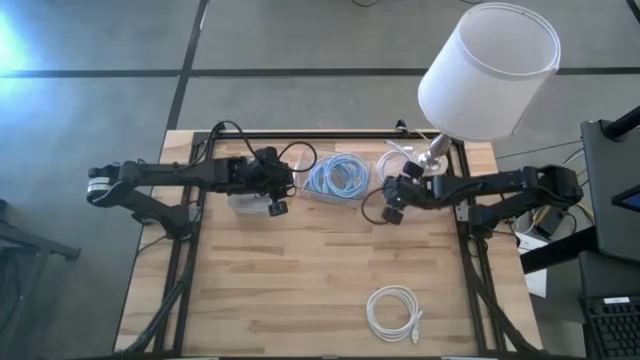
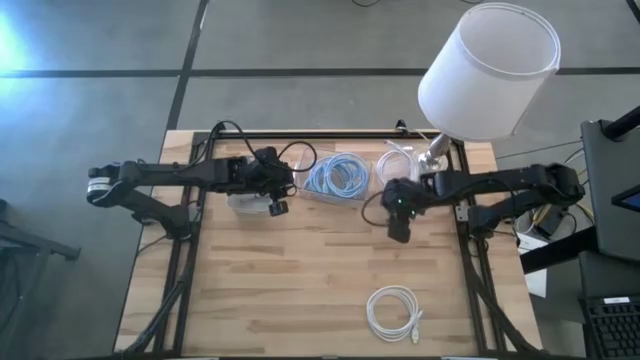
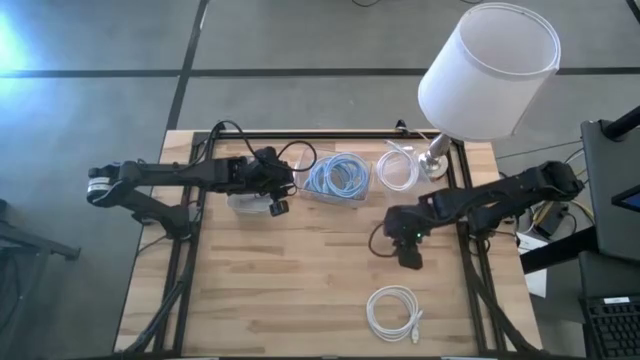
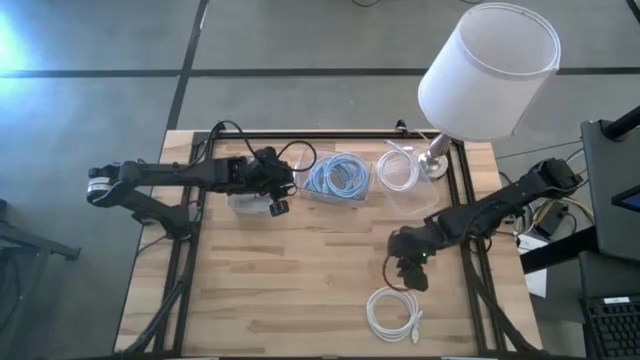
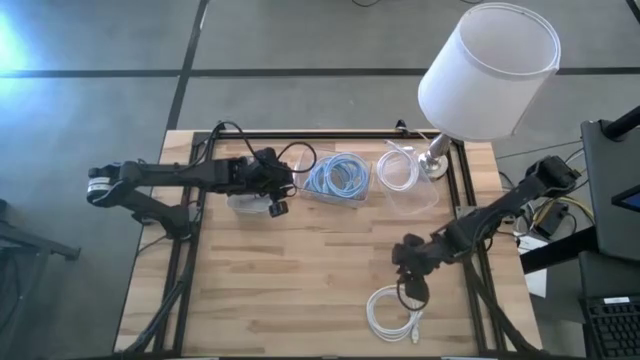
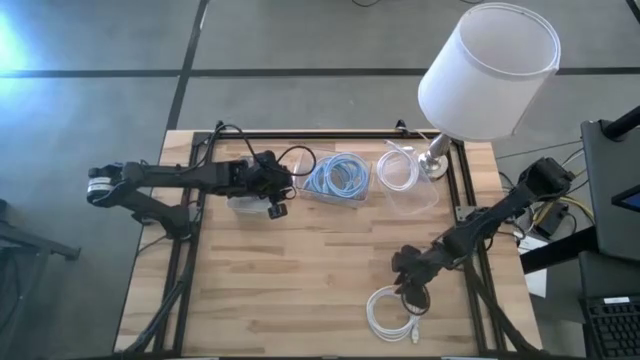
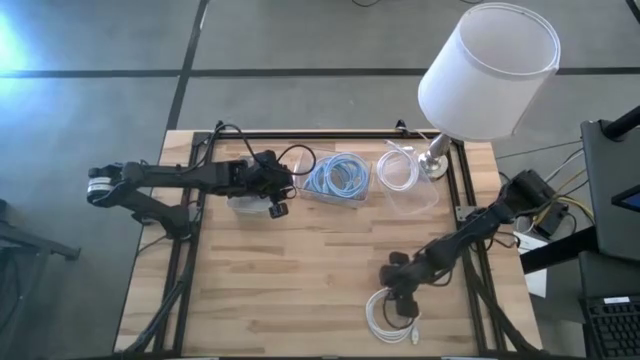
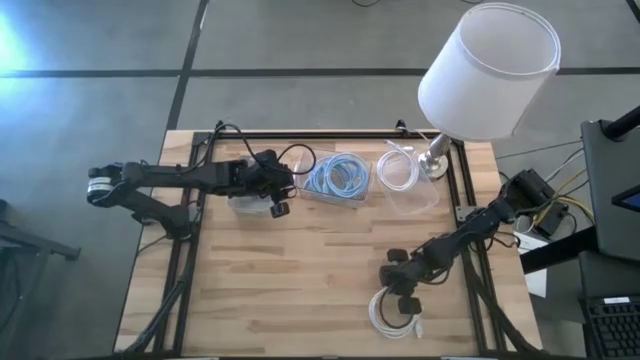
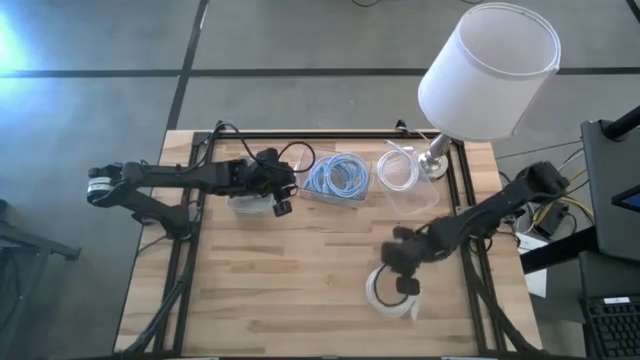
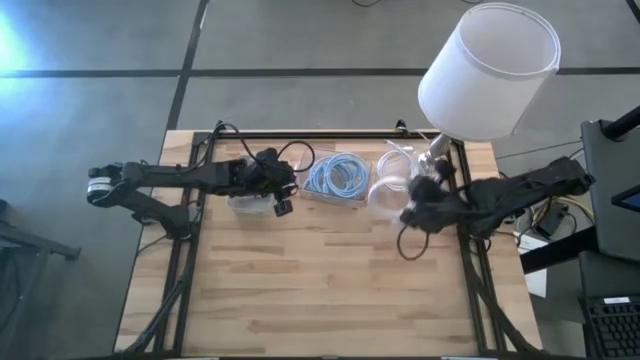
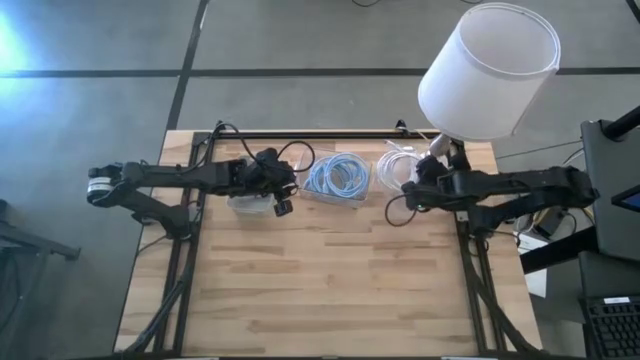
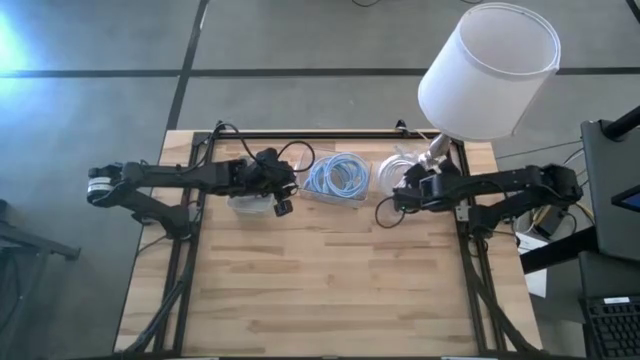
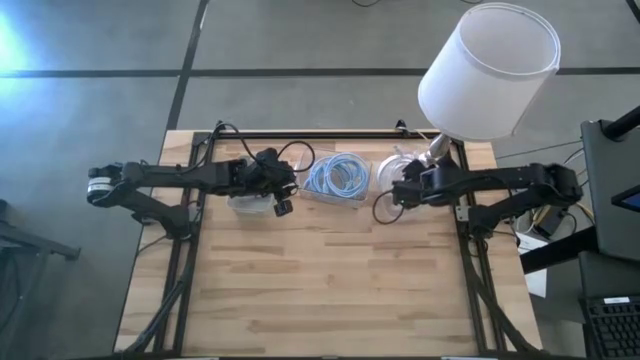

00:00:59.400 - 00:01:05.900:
Task: Pick & Place USB Port
Put the white HDMI cable into the right transparent bin

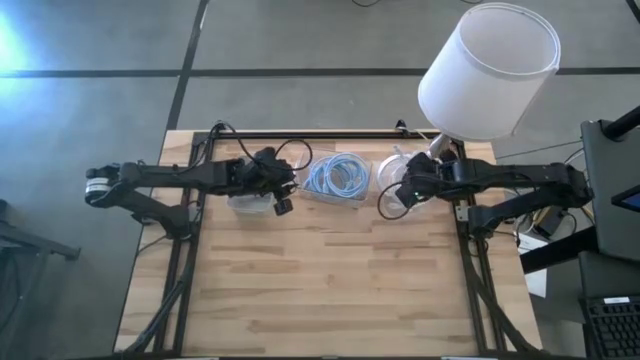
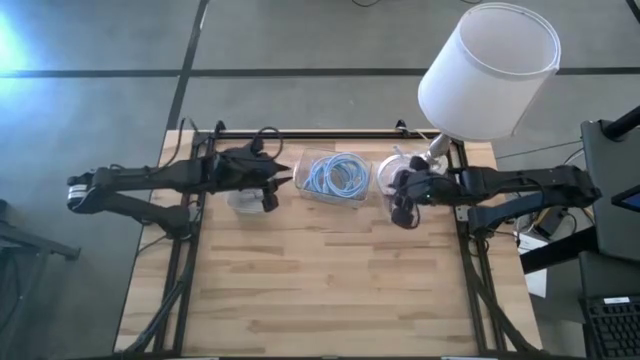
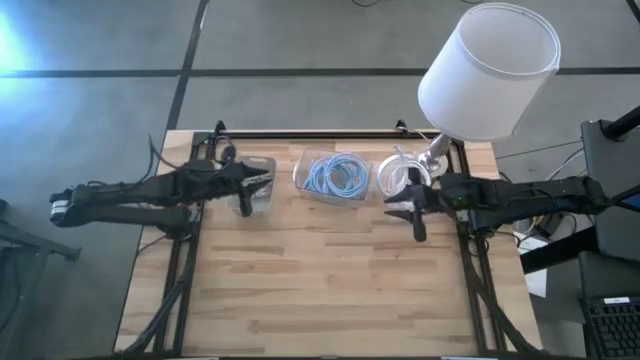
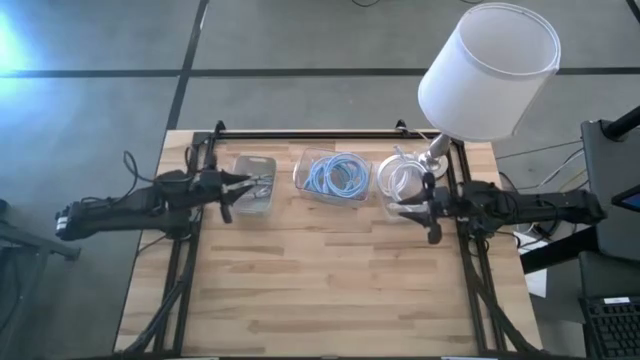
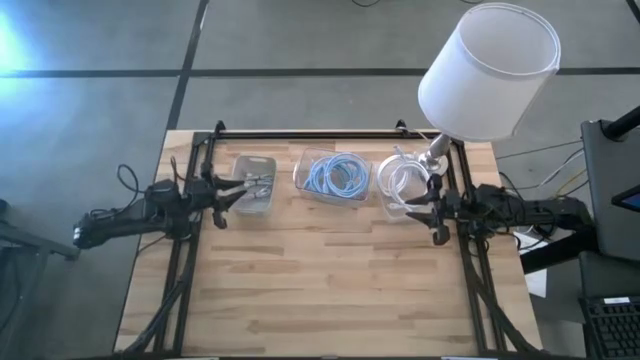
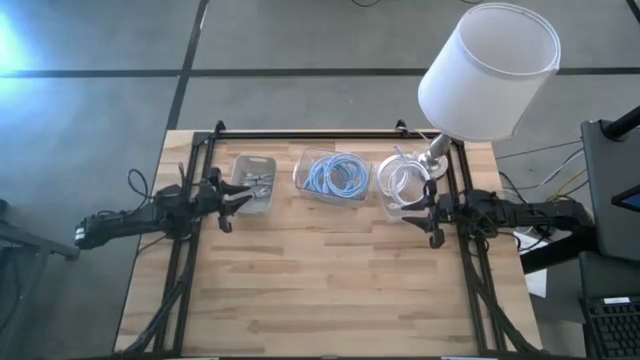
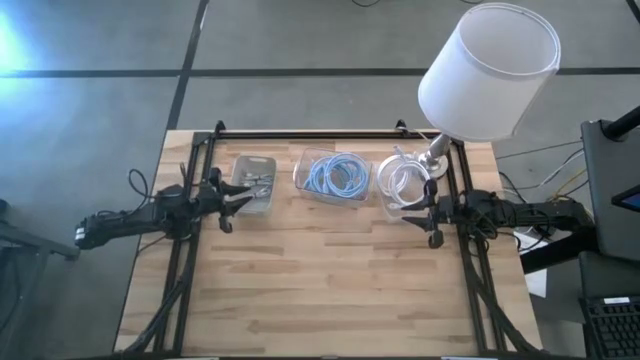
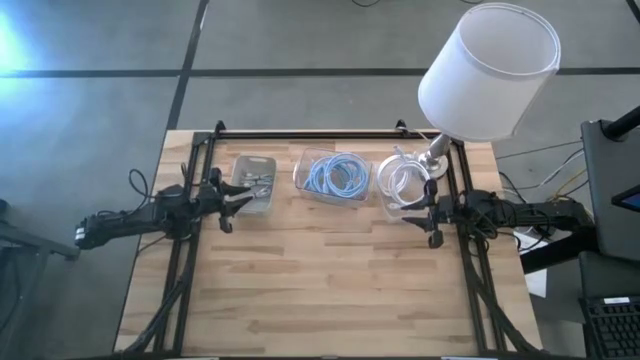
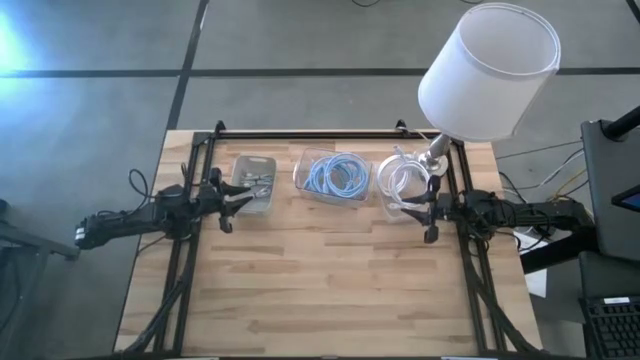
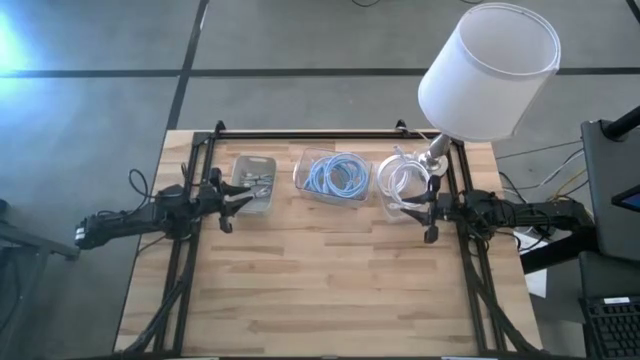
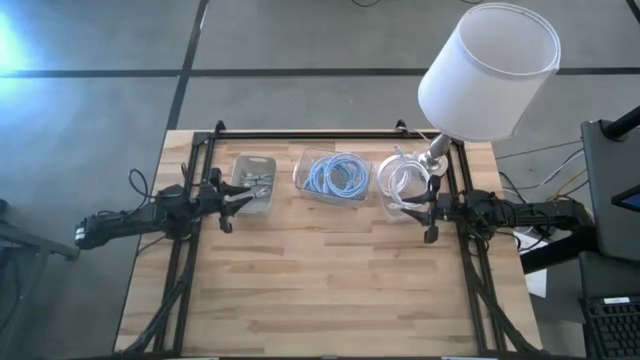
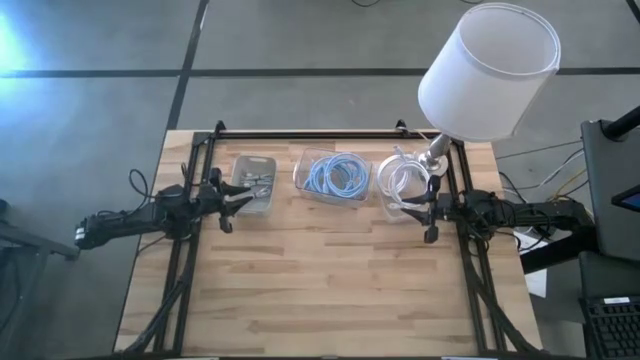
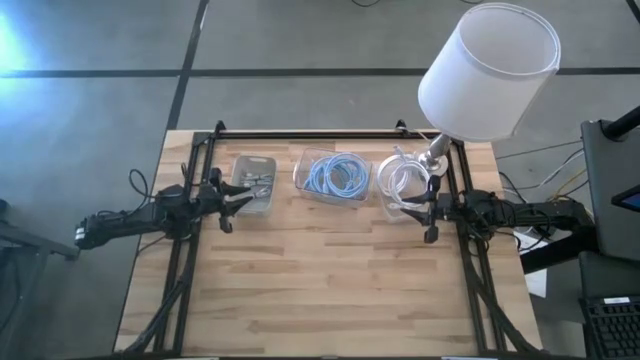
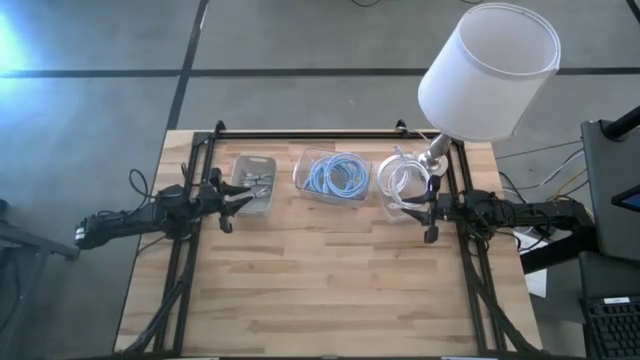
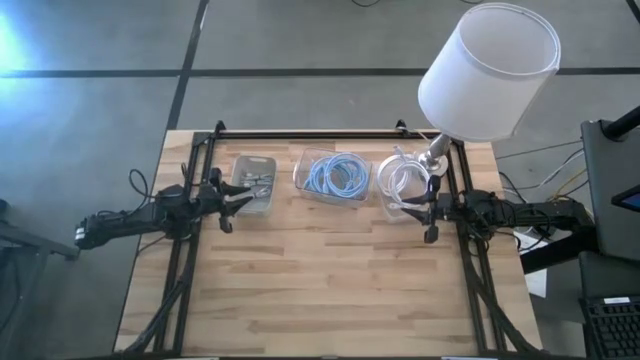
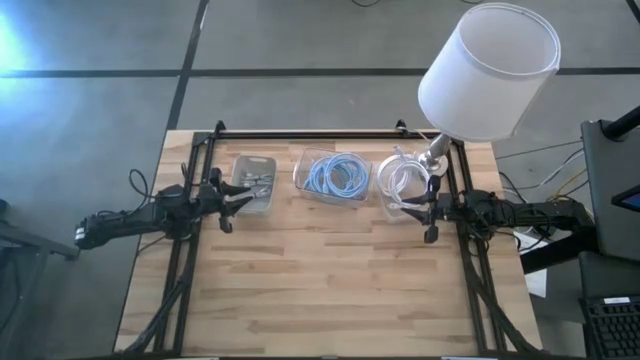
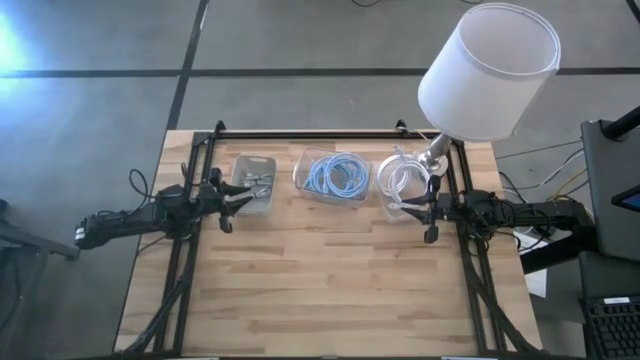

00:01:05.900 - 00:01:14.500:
Return to home position

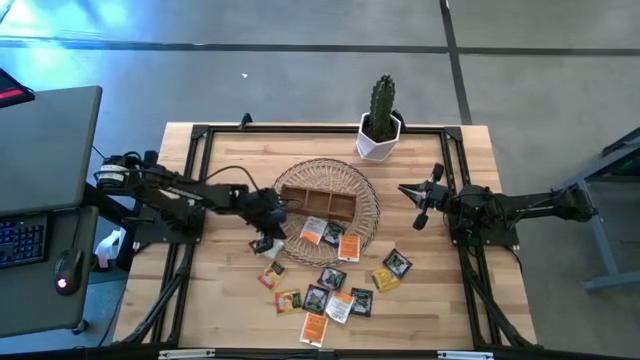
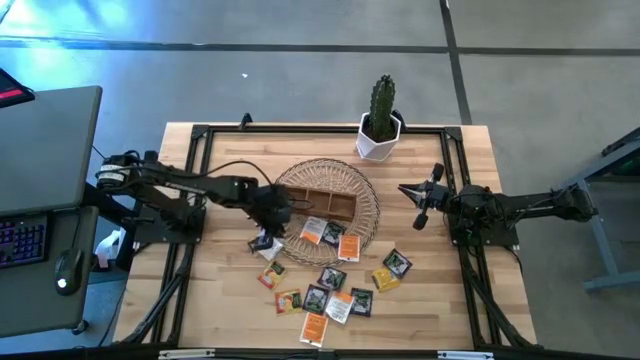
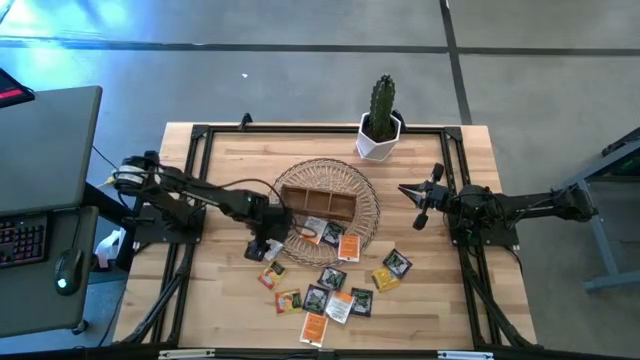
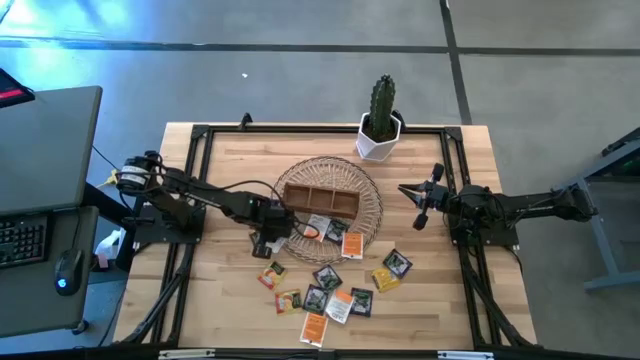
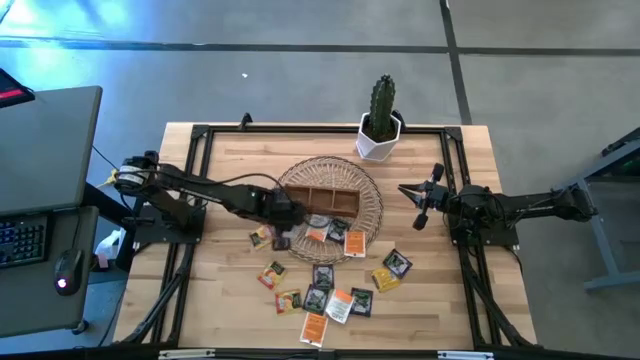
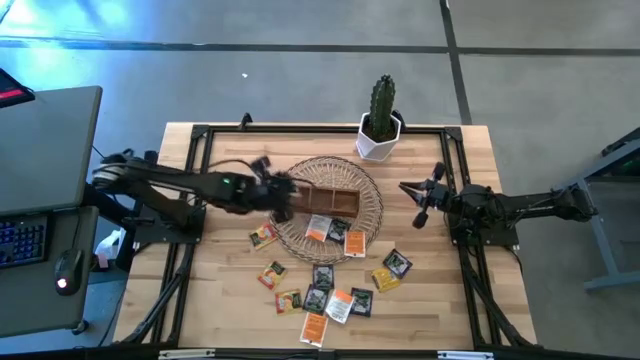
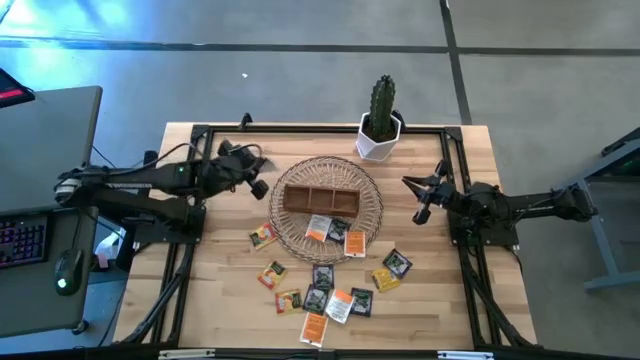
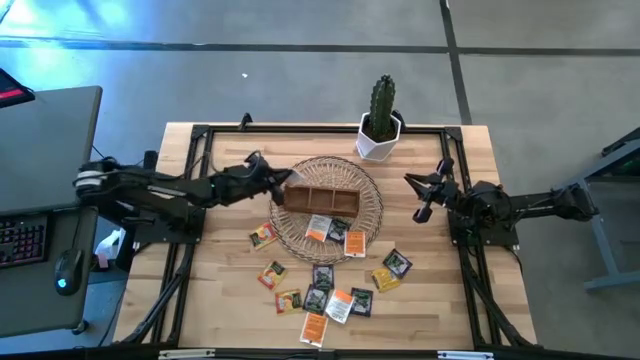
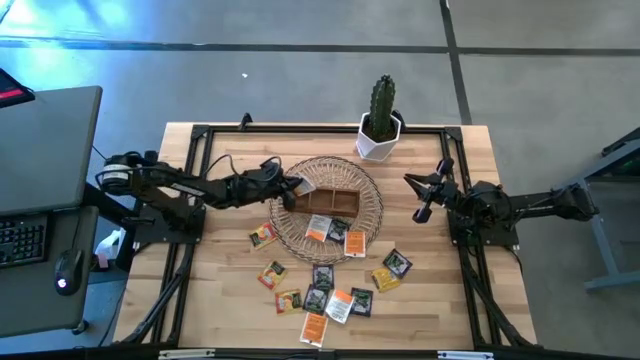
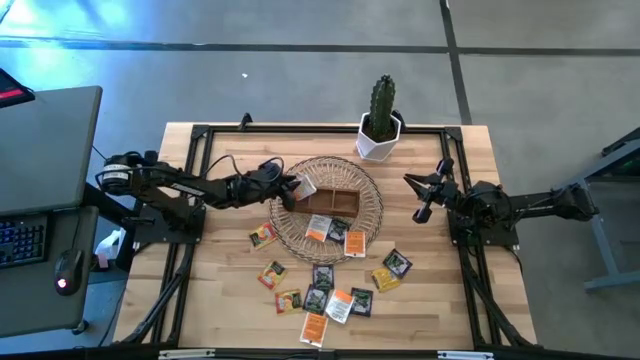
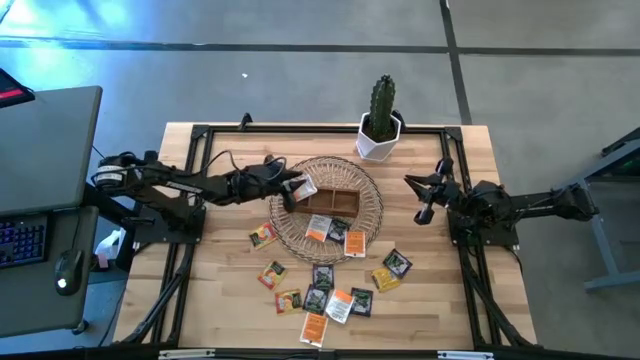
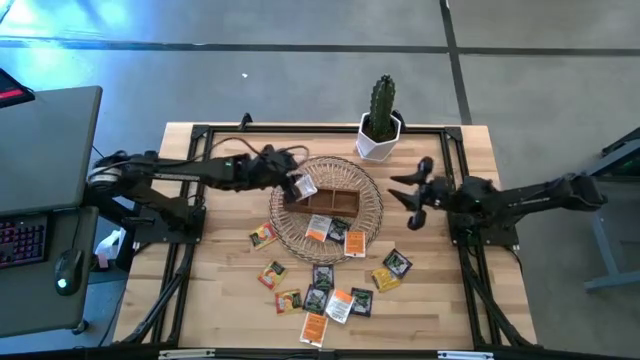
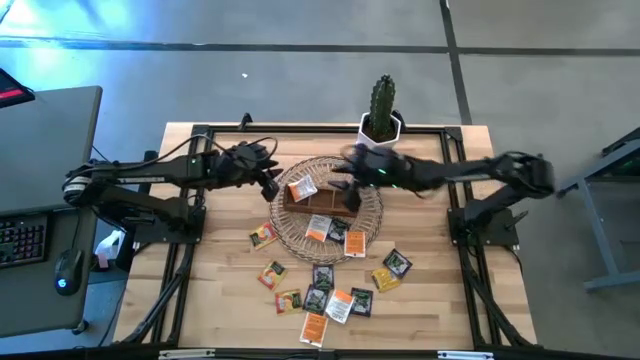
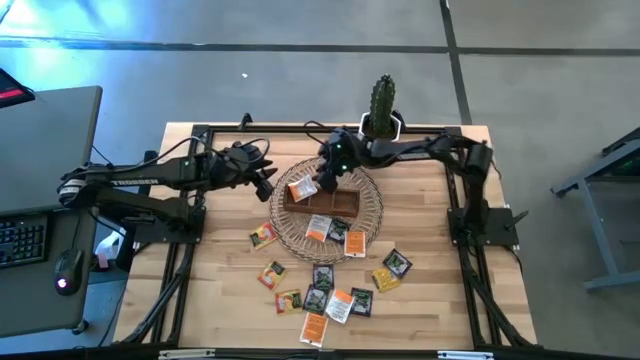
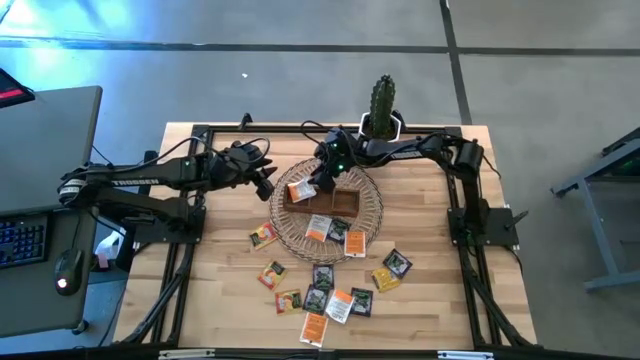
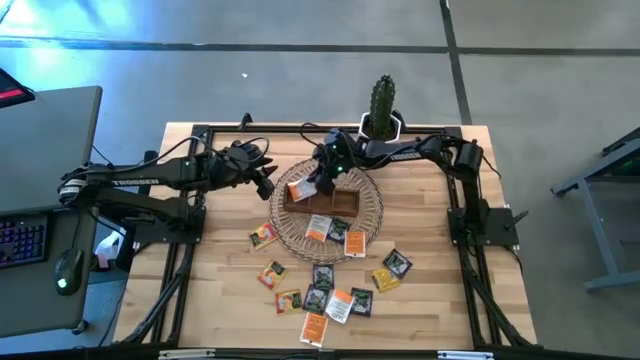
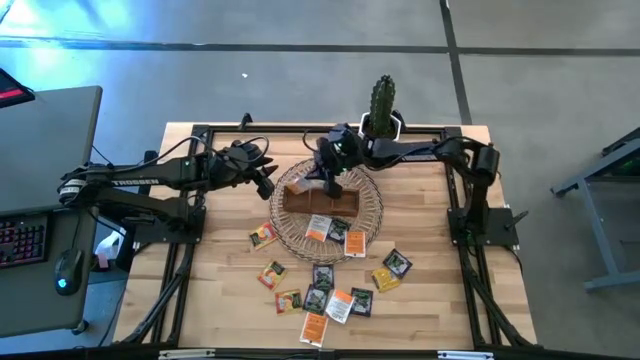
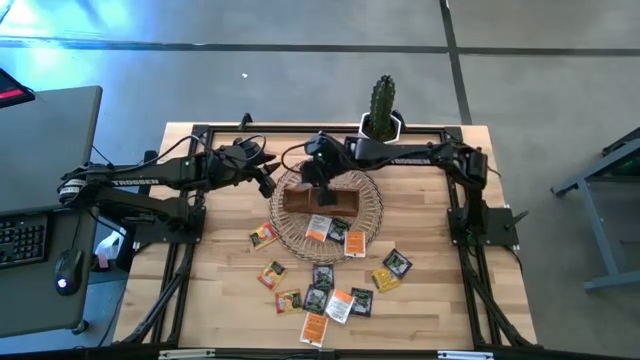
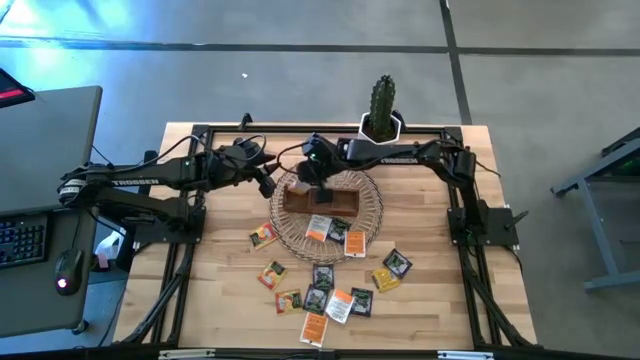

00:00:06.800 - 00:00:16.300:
Task: Pick & Place Tea
Put the orange tea pack into the left section of the wooden organizer
